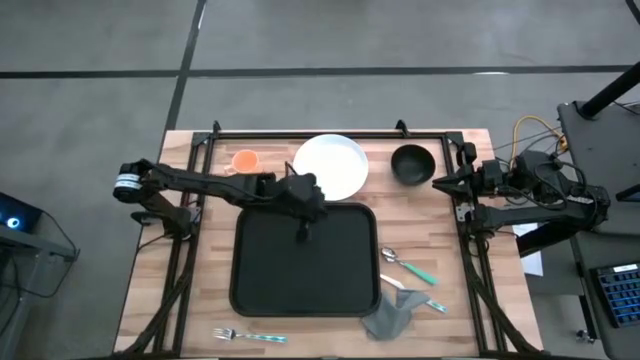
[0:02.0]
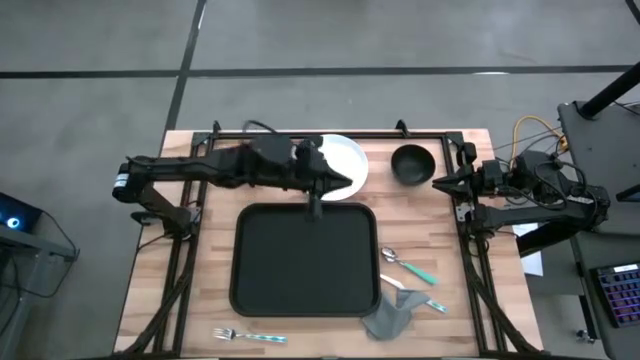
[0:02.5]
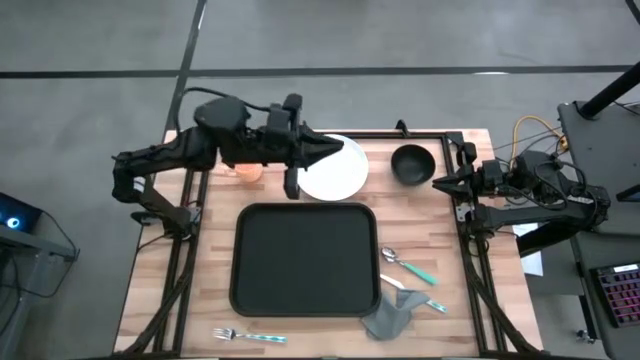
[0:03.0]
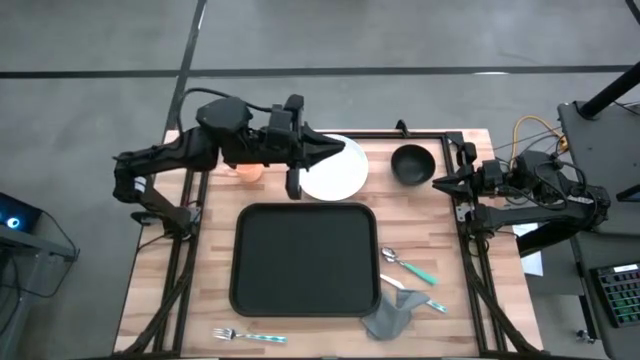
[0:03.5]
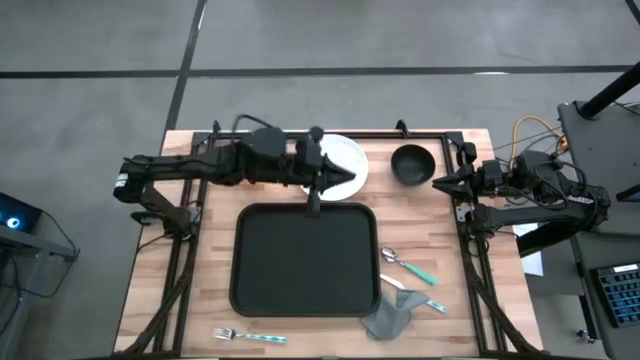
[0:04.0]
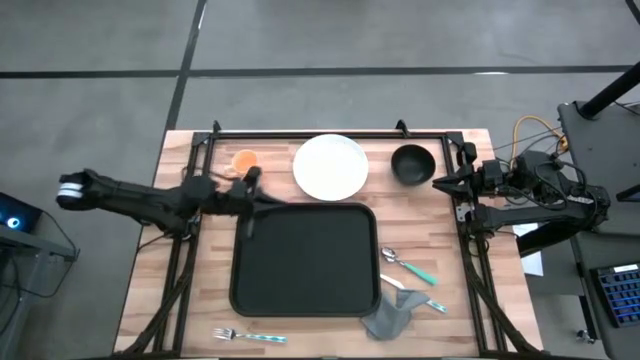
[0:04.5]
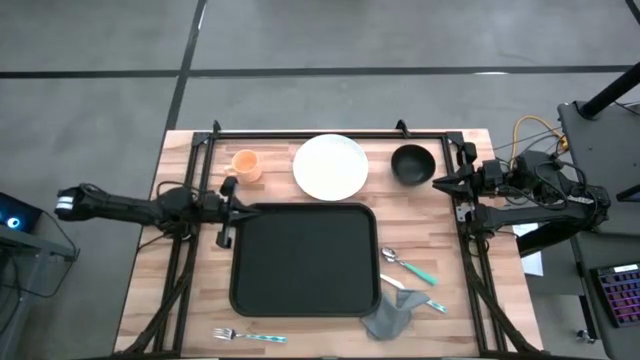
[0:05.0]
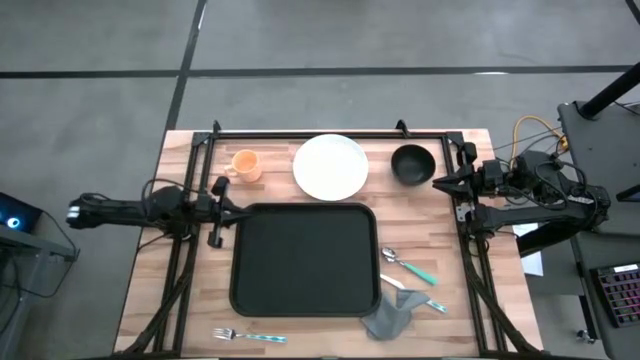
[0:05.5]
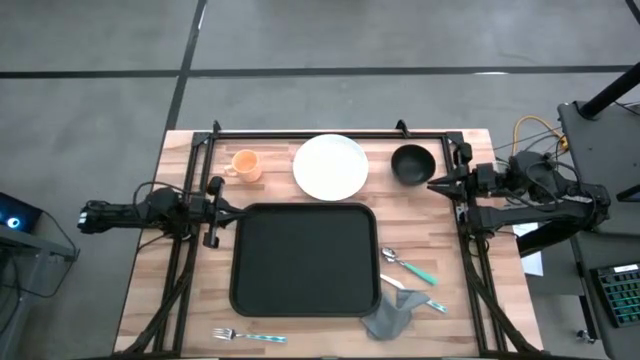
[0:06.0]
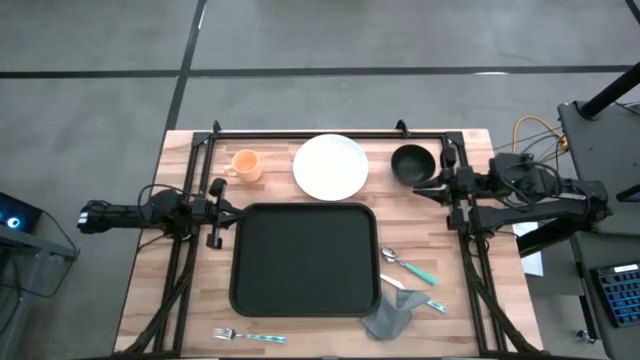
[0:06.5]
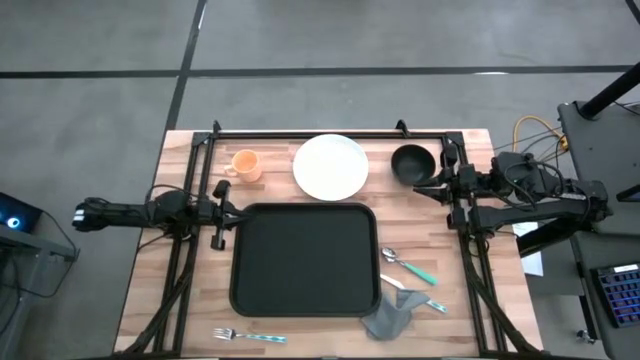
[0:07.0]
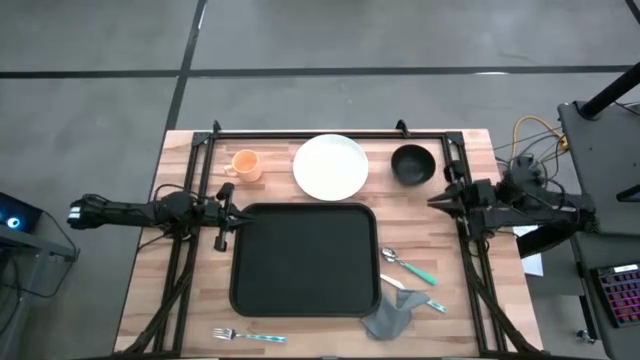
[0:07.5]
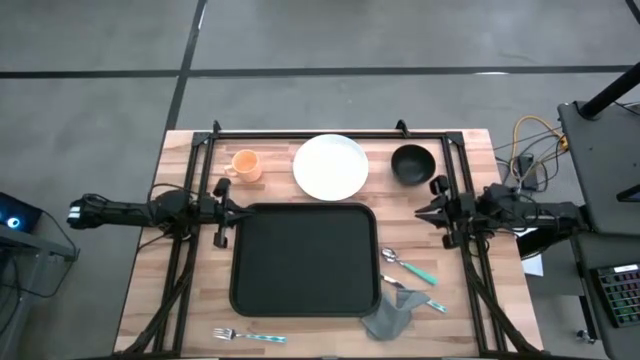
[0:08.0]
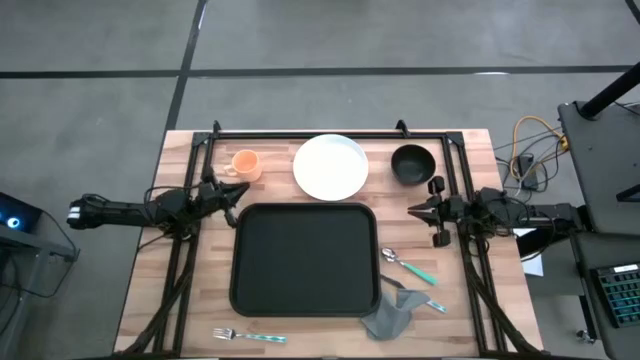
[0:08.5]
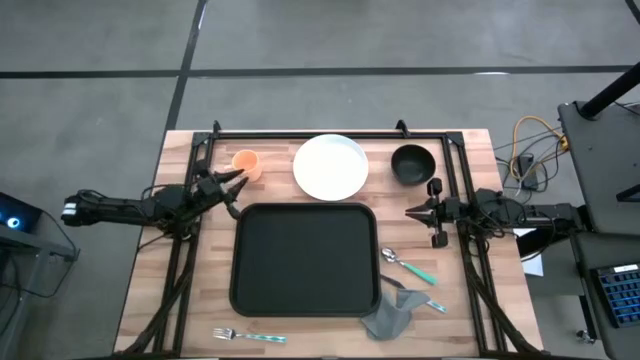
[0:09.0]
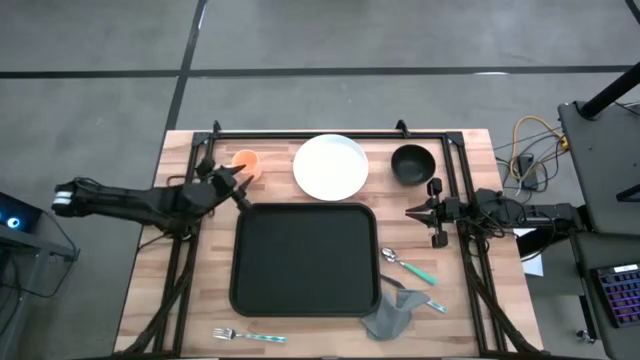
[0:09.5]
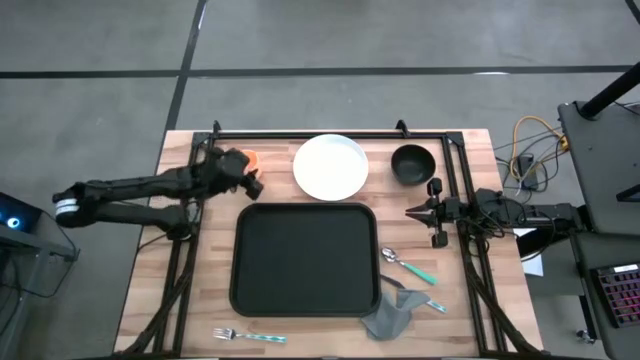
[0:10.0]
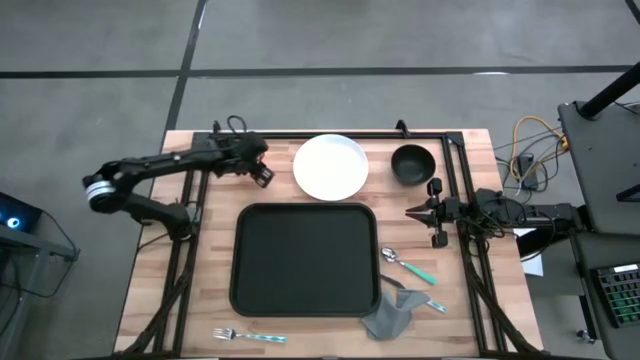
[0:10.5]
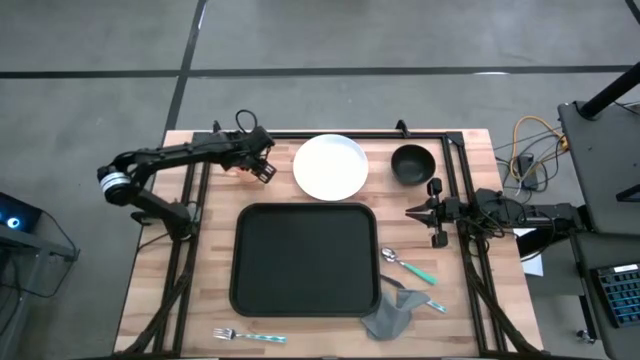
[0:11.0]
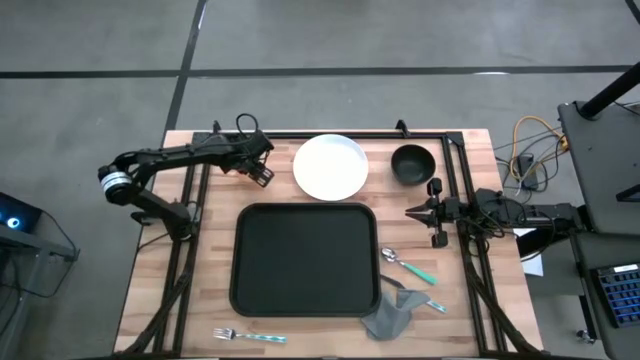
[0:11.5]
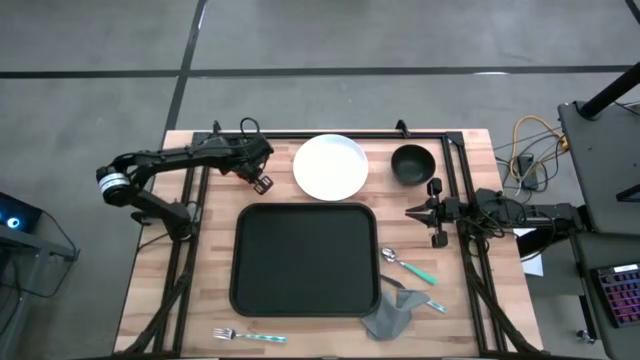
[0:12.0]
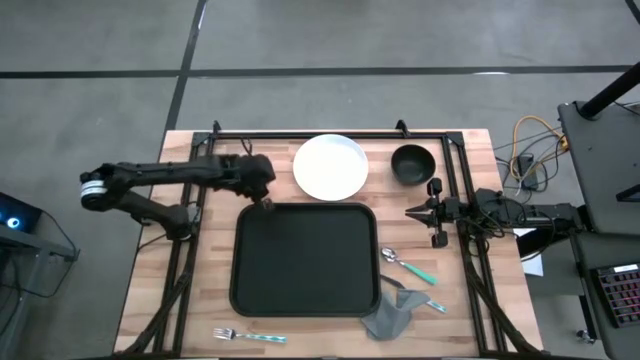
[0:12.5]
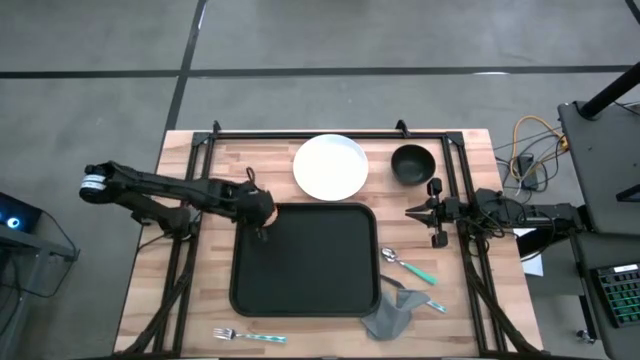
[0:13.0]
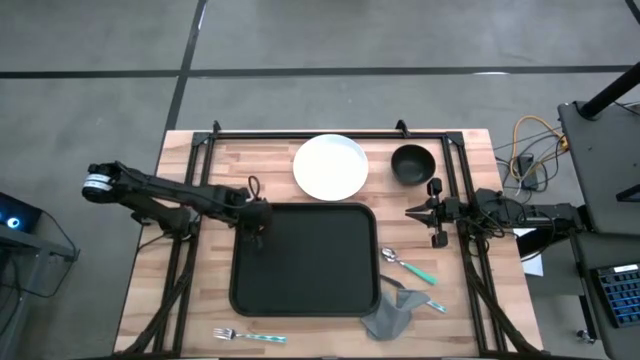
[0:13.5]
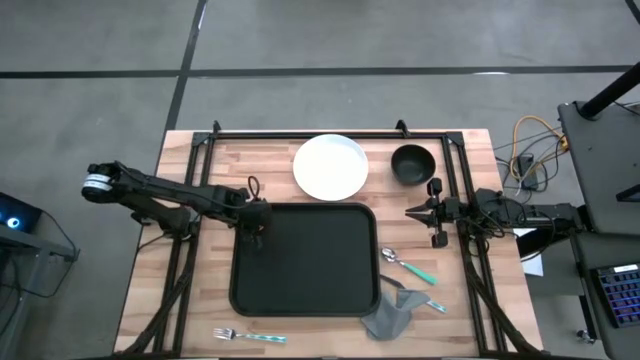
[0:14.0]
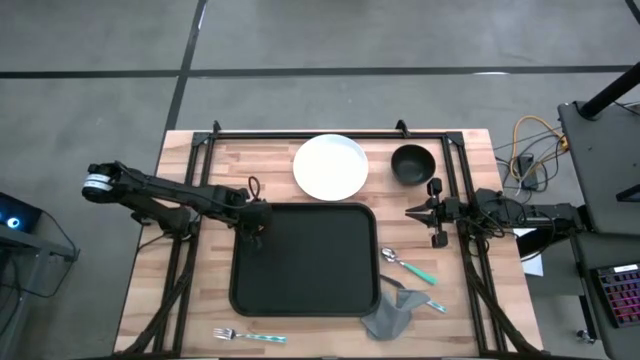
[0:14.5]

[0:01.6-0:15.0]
Task: Set up tray
Put the mug on the serving tray
